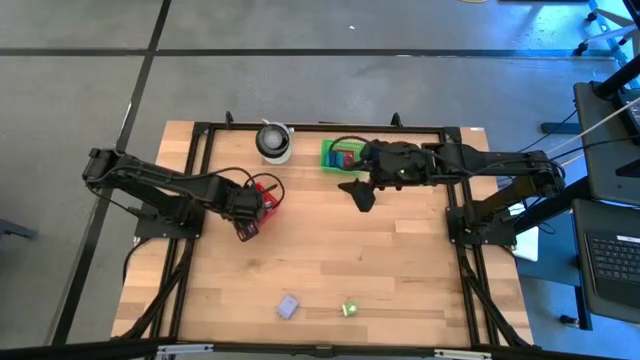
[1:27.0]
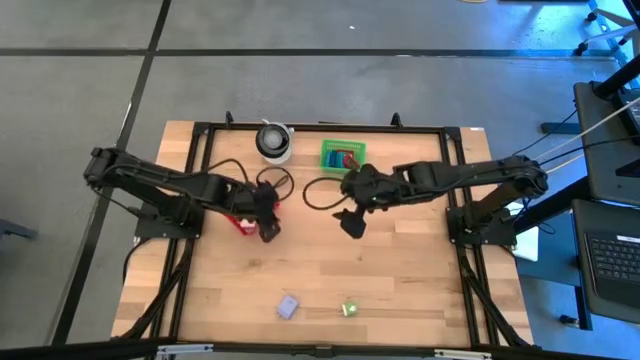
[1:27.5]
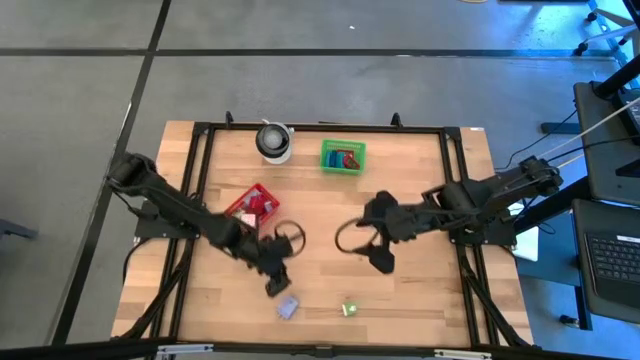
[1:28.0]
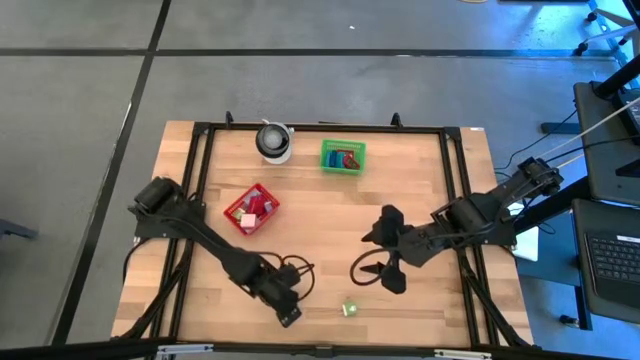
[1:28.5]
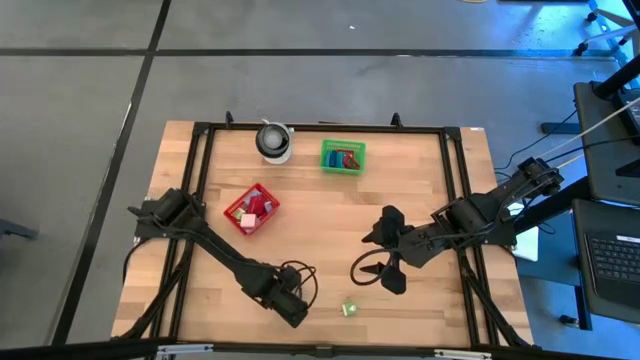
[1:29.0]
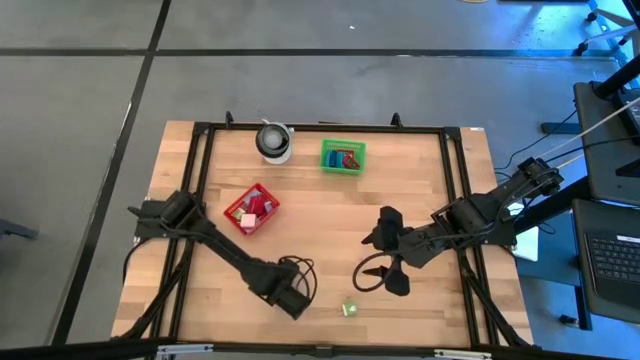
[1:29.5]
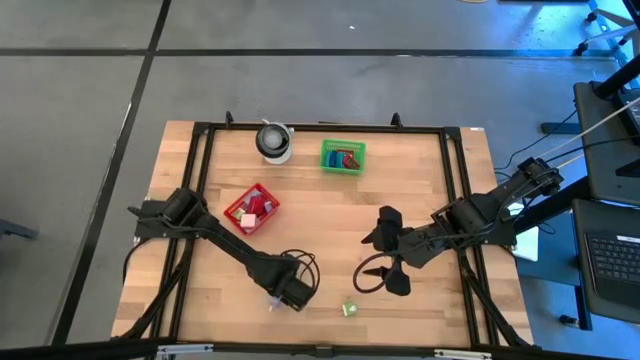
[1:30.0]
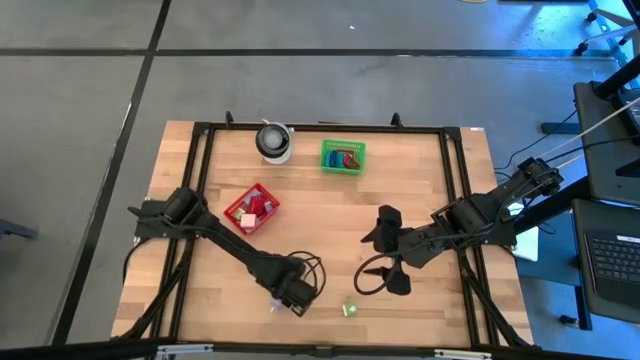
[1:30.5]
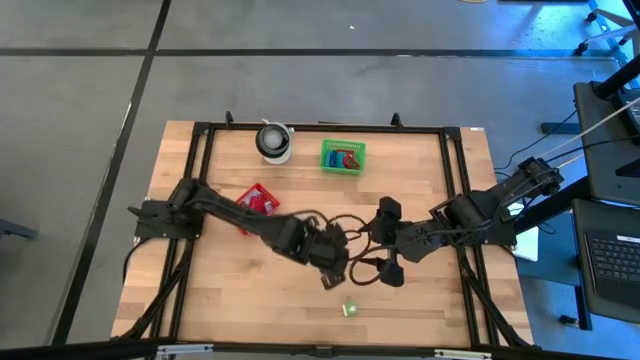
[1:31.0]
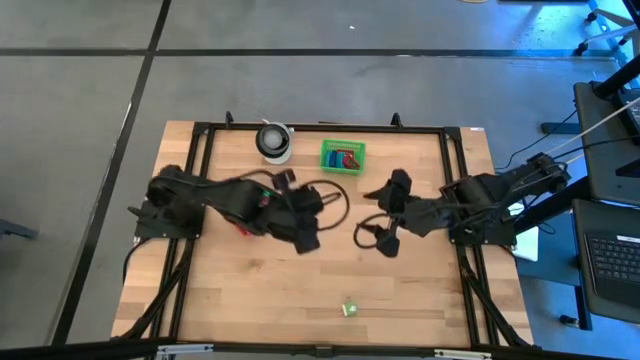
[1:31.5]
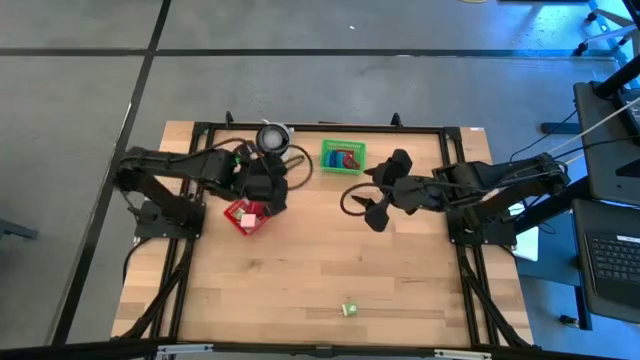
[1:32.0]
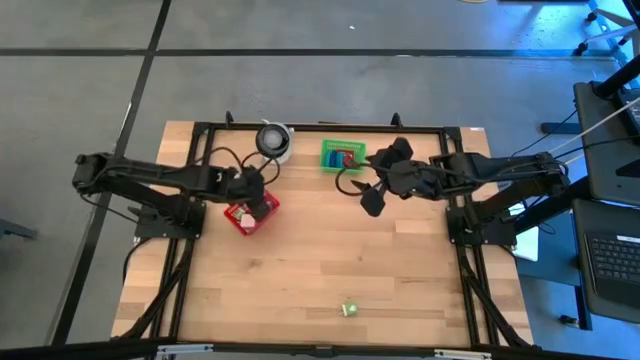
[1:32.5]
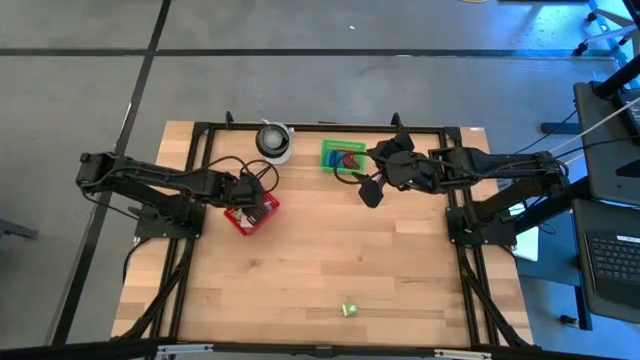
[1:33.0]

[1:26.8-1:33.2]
Task: Pick & Place Office items
Put the light purple charger adapter into the red bin

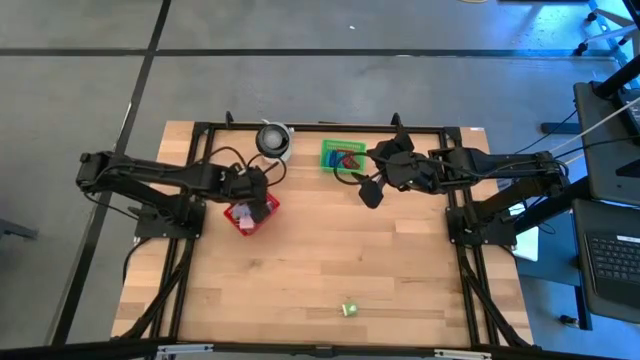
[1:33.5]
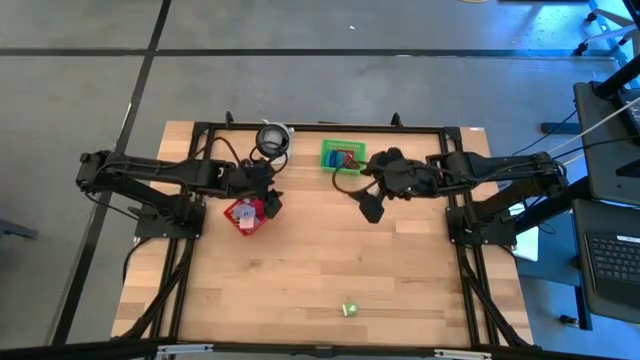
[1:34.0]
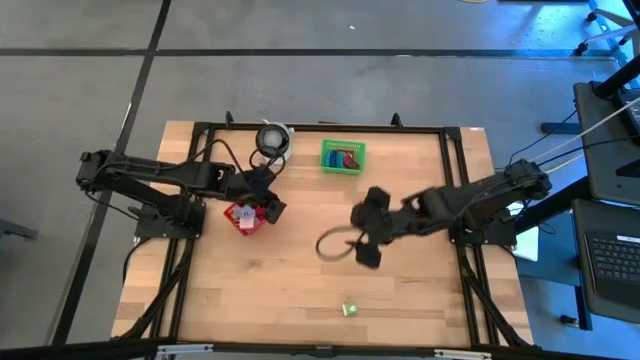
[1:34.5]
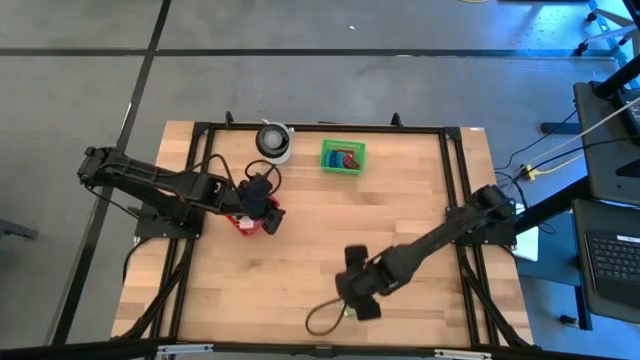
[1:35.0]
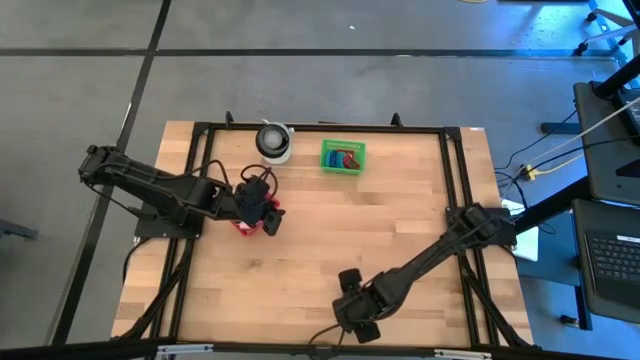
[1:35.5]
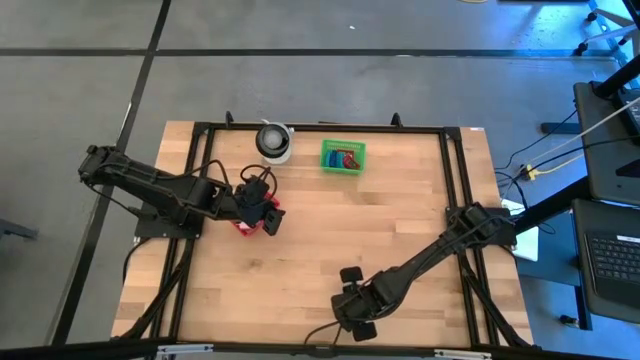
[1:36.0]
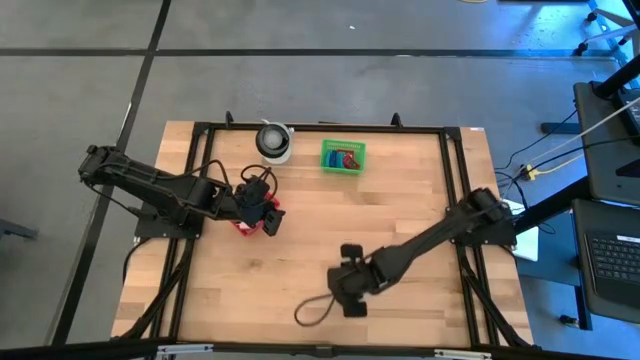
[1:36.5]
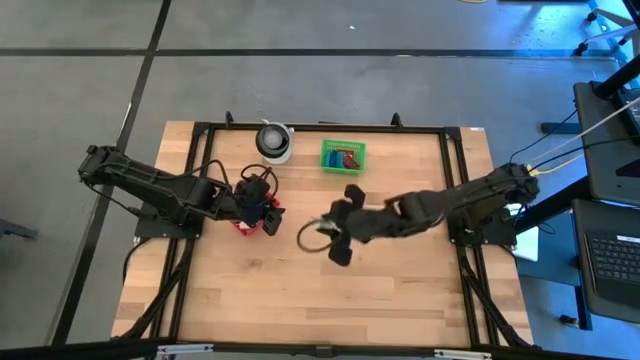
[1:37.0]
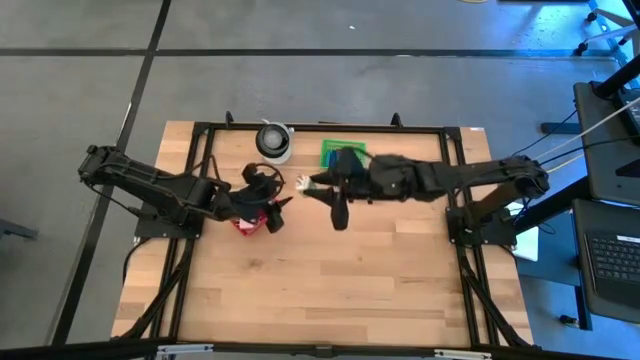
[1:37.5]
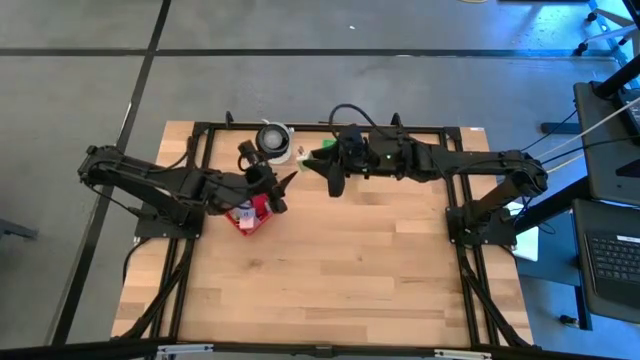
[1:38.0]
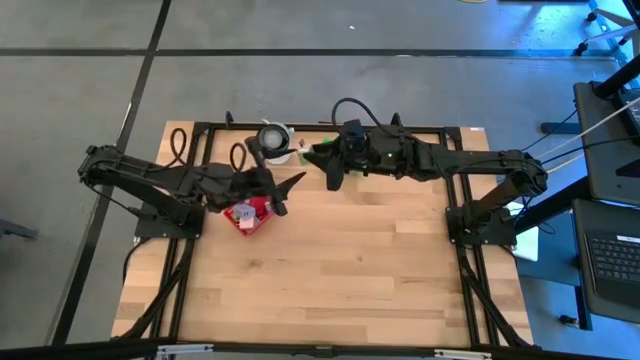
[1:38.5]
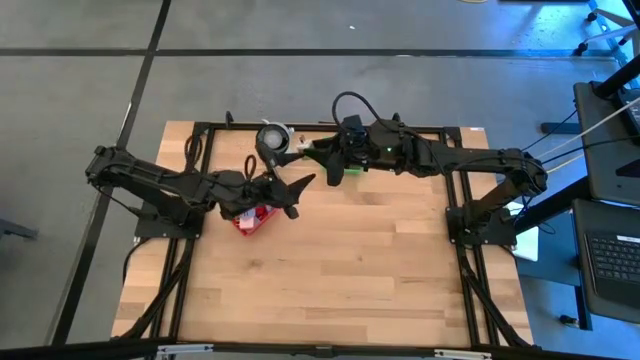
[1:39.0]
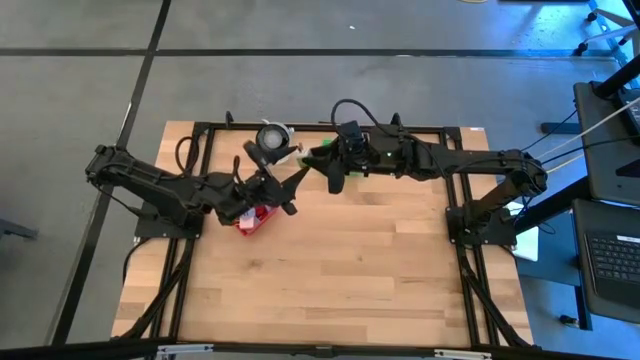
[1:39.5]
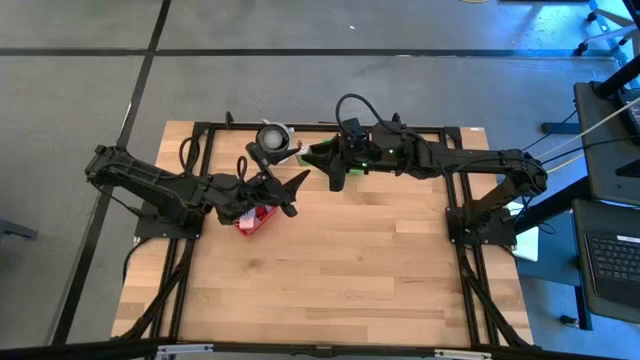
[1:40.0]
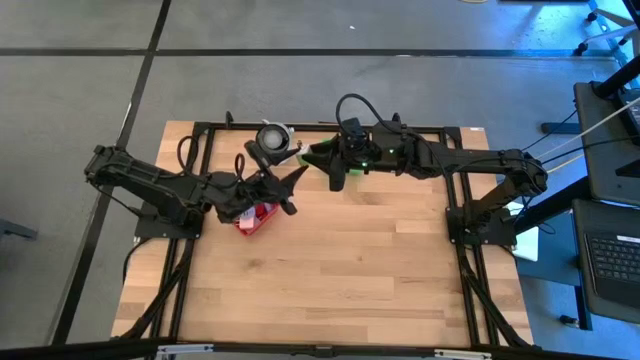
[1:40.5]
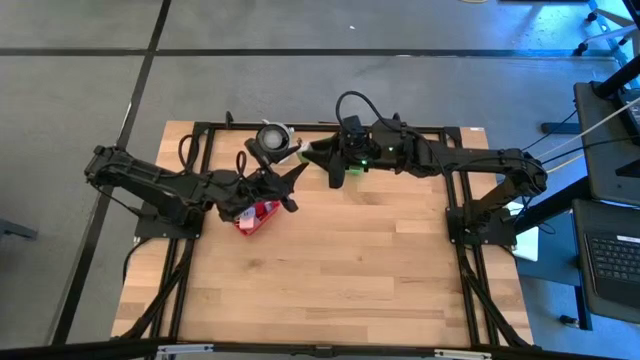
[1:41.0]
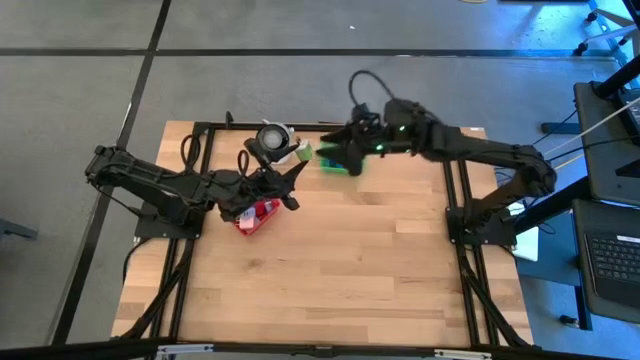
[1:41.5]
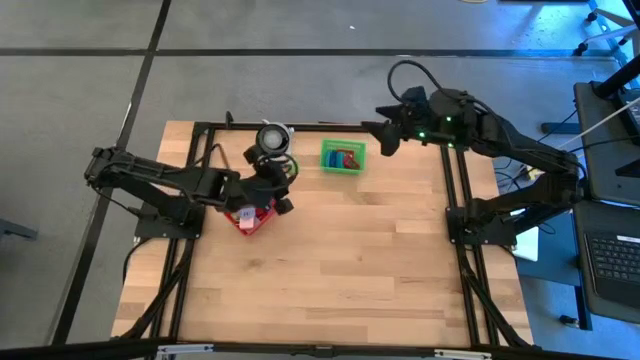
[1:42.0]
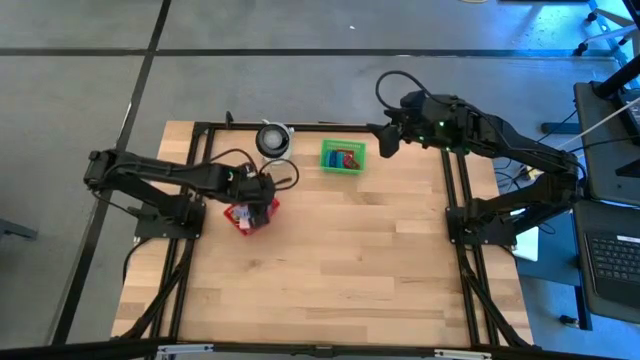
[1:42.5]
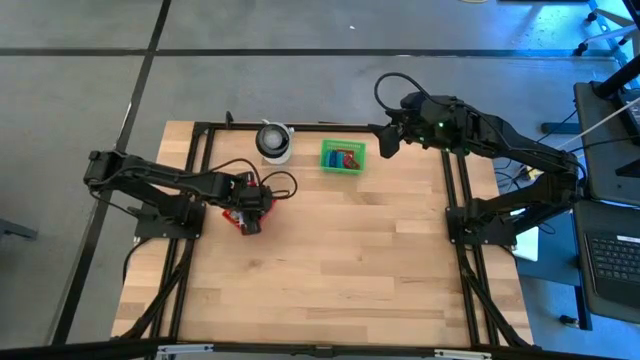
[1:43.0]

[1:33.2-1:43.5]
Put the green charger adapter into the red bin

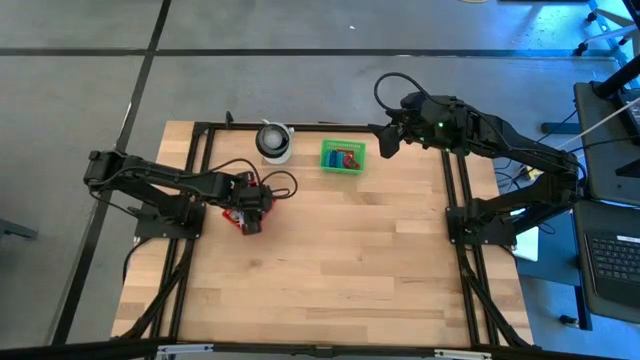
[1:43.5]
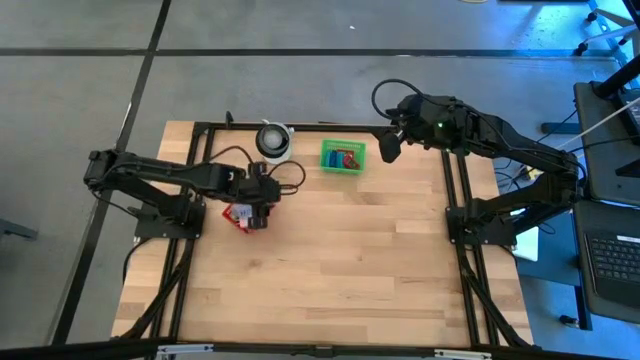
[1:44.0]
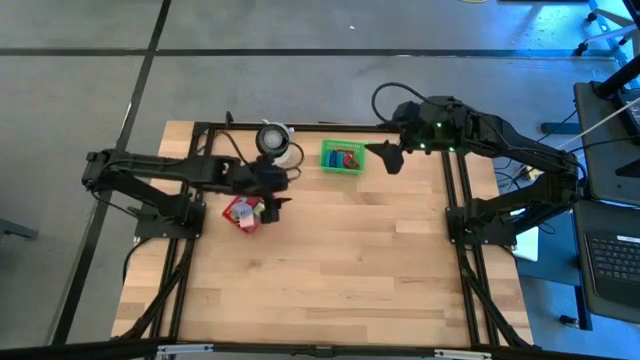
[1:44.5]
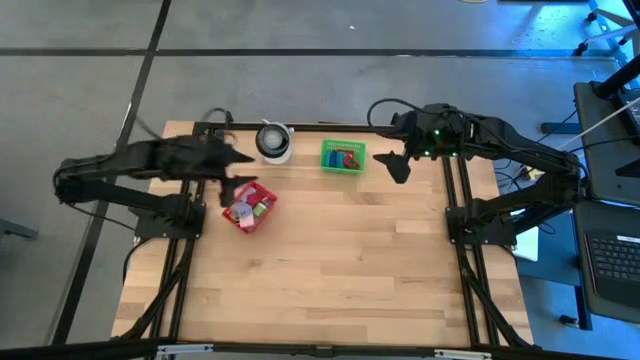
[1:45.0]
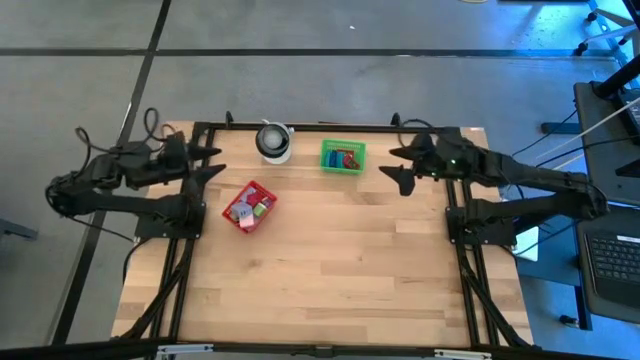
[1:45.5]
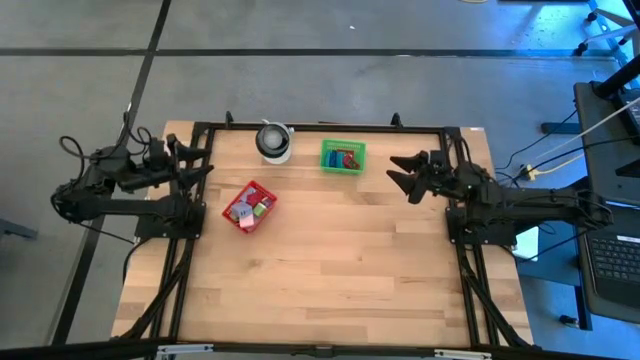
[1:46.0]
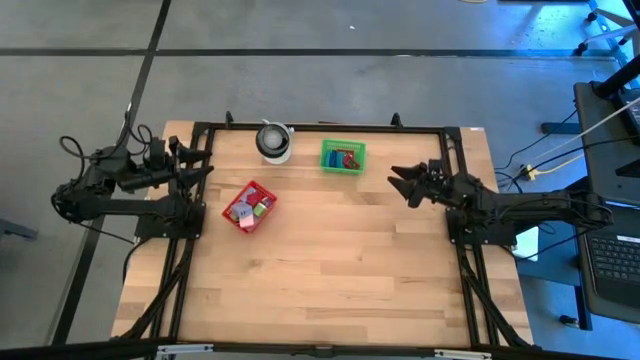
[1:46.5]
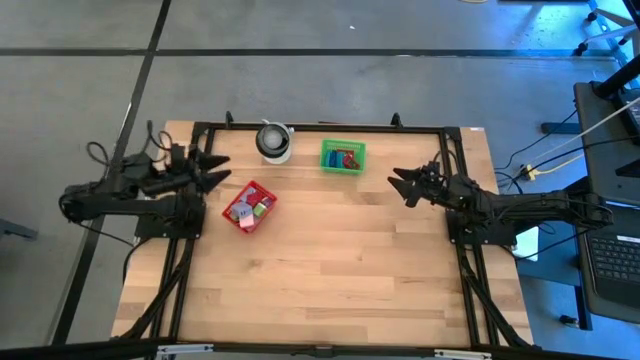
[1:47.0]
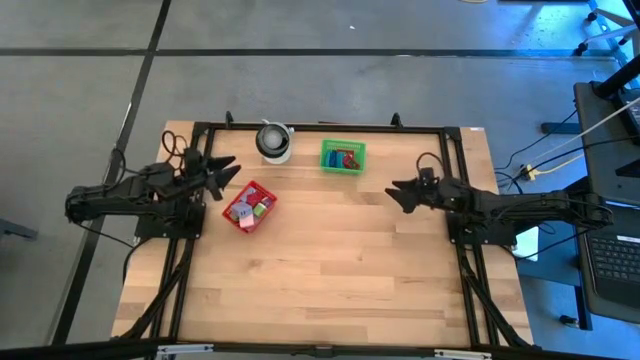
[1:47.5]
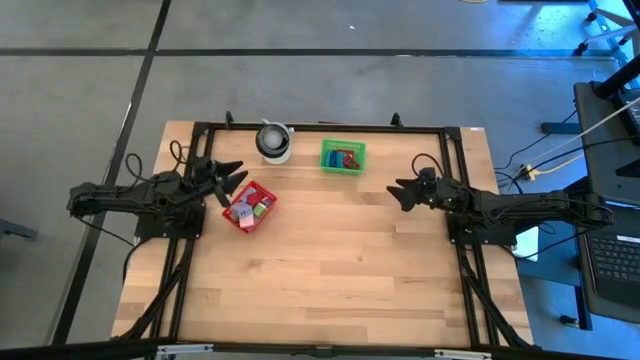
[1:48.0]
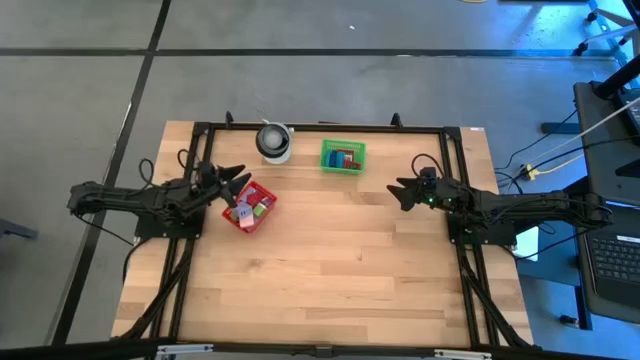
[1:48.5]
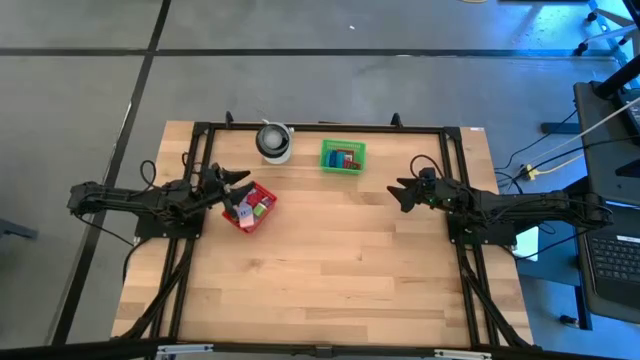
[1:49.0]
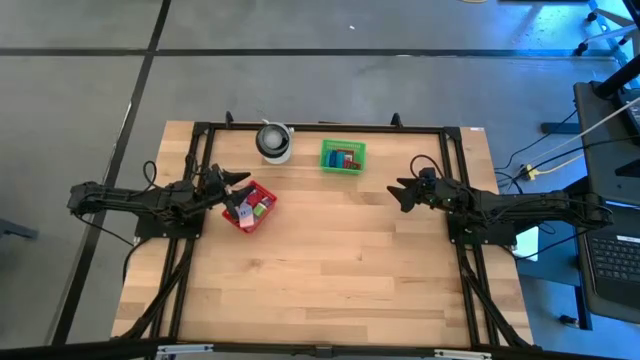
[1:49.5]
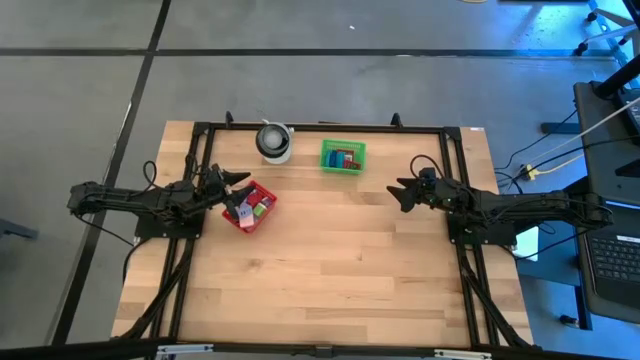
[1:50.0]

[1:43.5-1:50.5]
Return to Home Position
